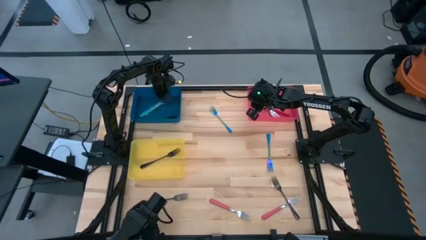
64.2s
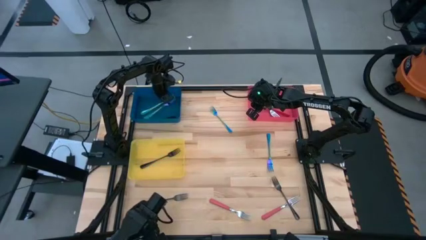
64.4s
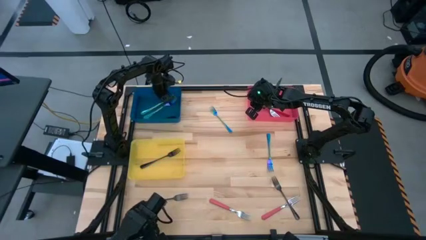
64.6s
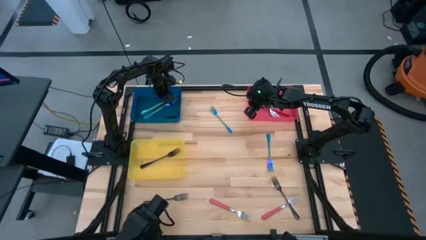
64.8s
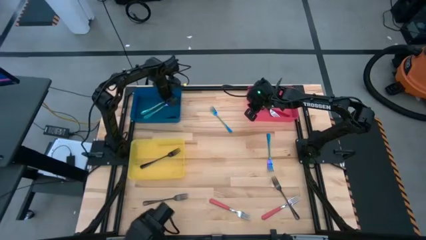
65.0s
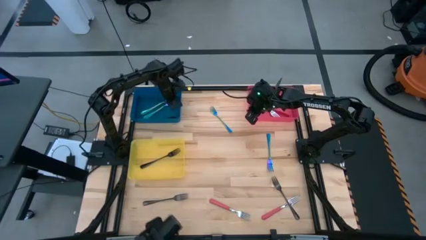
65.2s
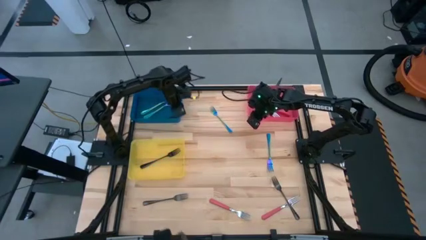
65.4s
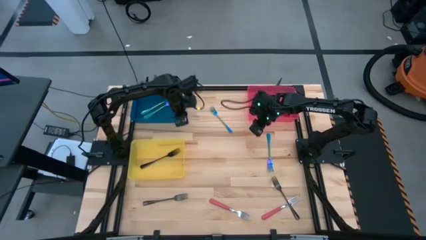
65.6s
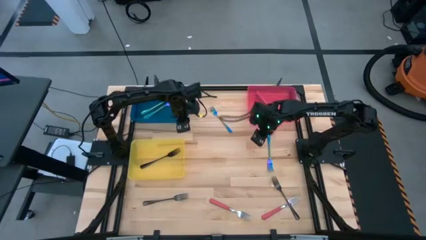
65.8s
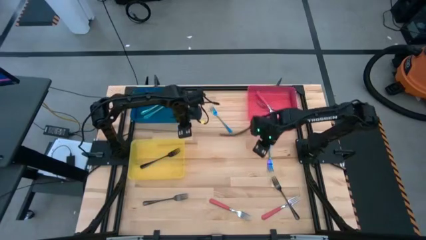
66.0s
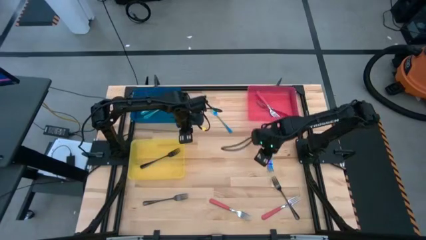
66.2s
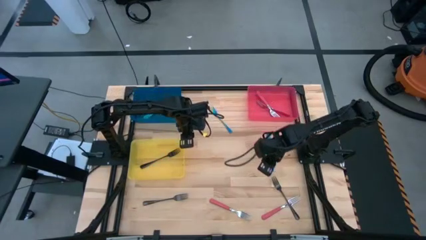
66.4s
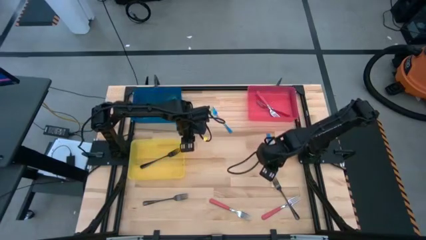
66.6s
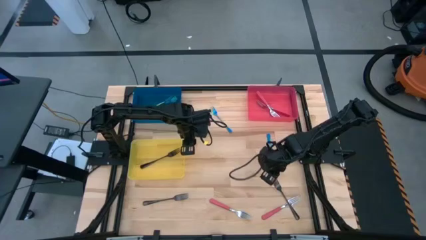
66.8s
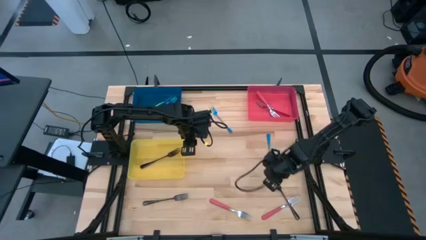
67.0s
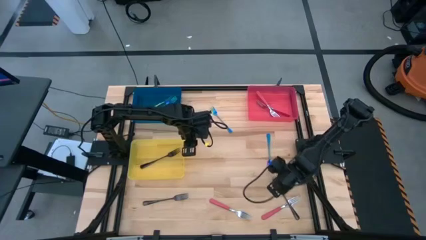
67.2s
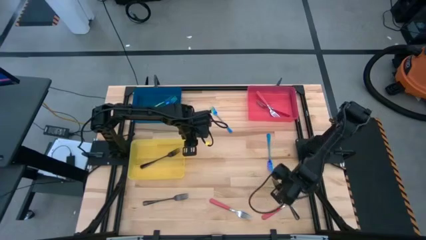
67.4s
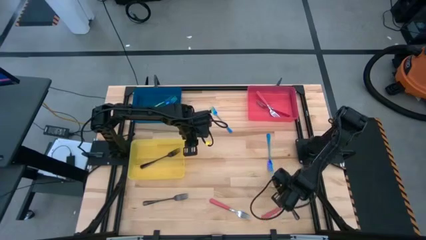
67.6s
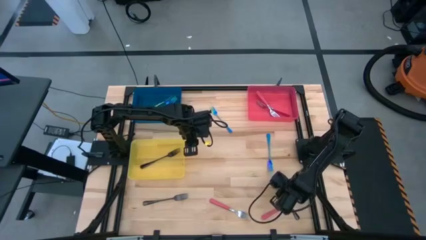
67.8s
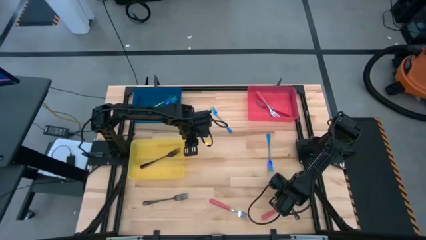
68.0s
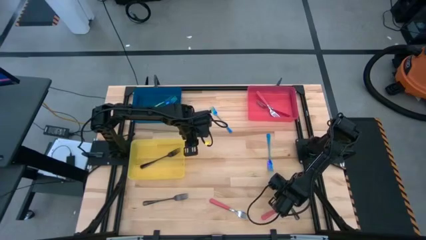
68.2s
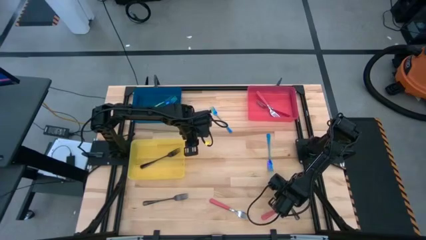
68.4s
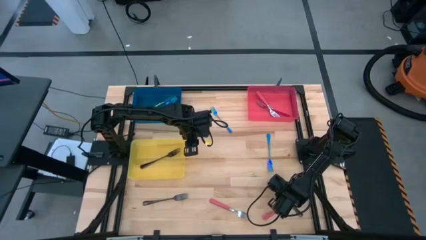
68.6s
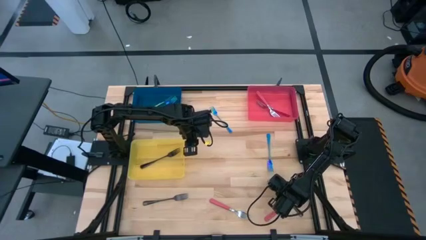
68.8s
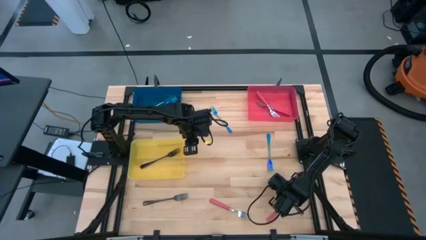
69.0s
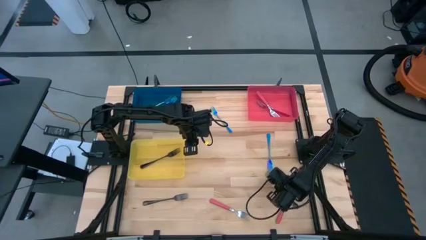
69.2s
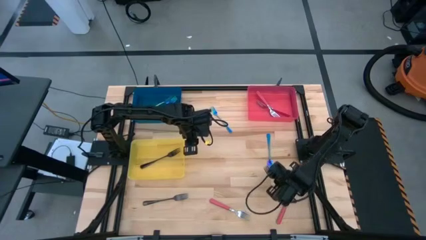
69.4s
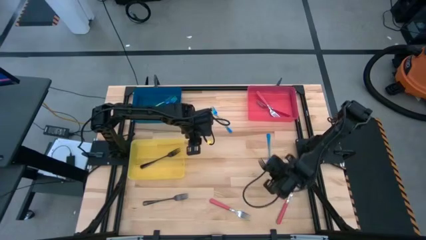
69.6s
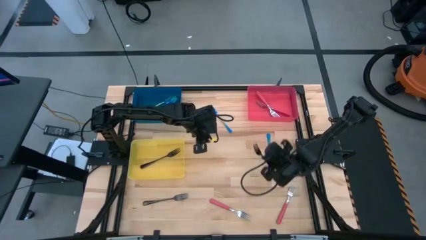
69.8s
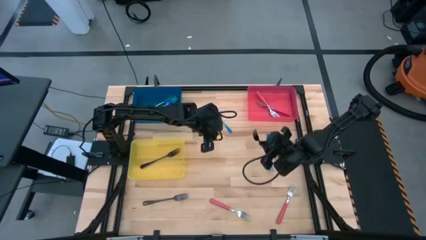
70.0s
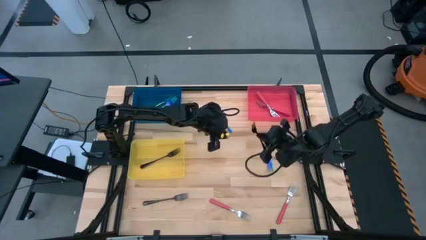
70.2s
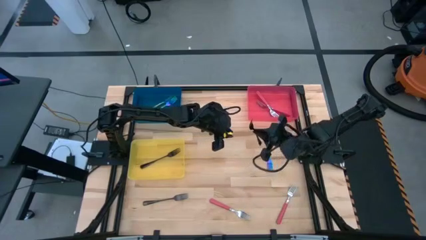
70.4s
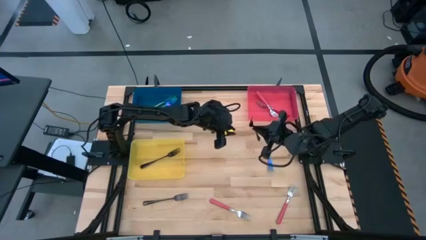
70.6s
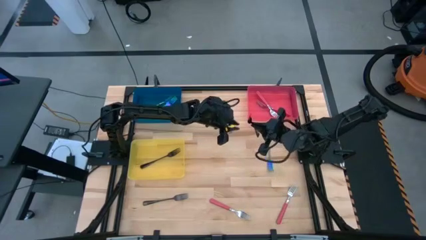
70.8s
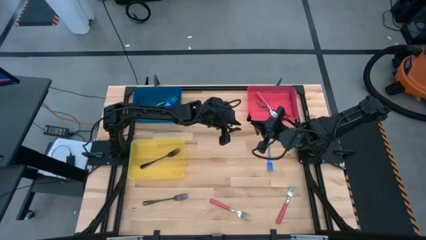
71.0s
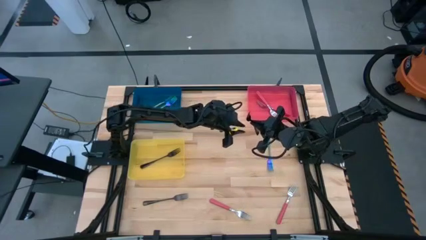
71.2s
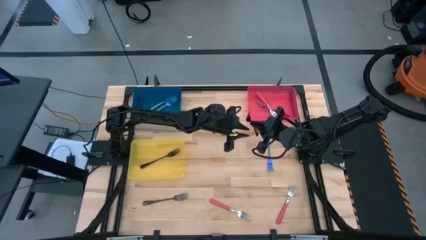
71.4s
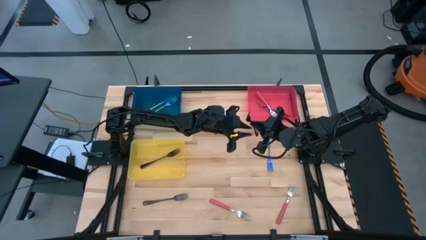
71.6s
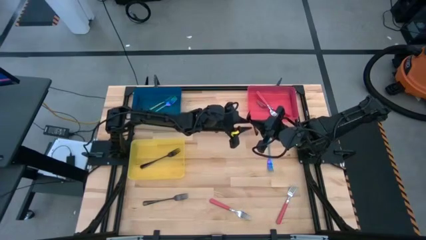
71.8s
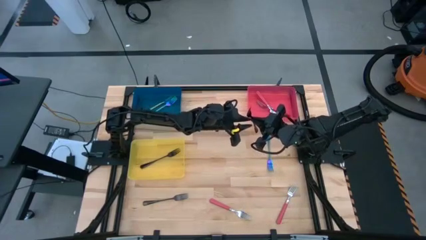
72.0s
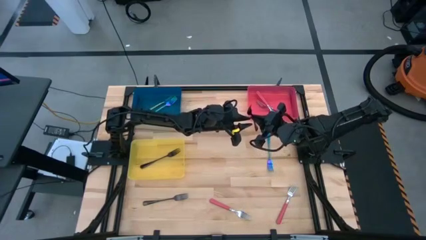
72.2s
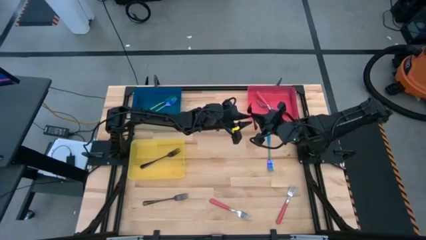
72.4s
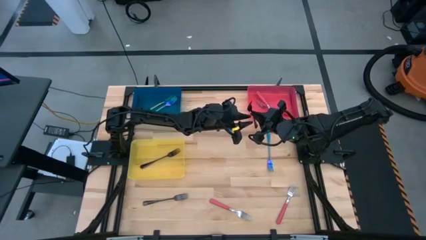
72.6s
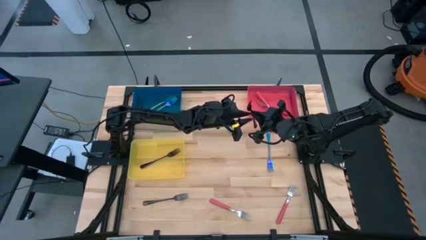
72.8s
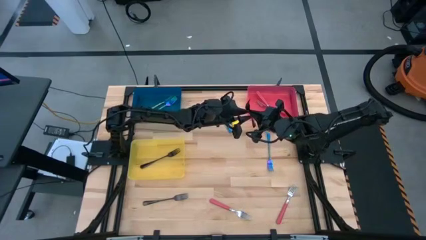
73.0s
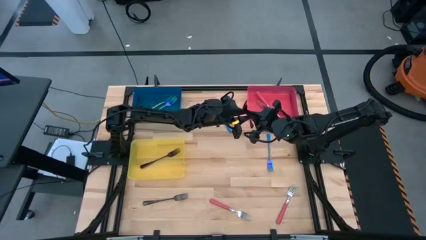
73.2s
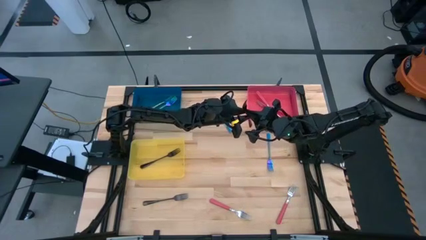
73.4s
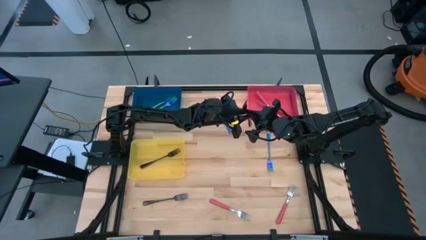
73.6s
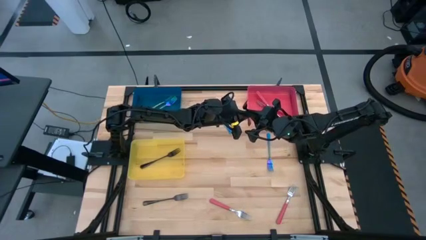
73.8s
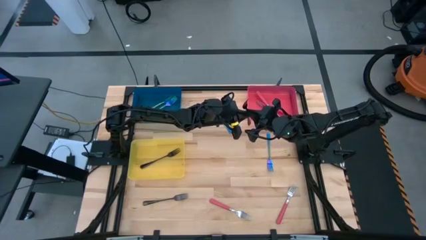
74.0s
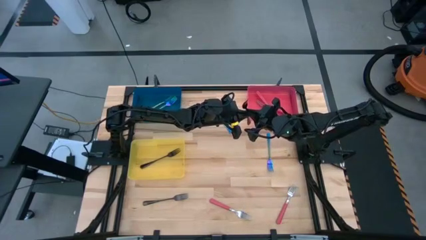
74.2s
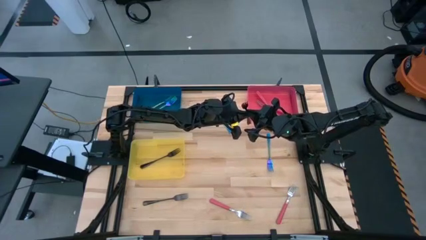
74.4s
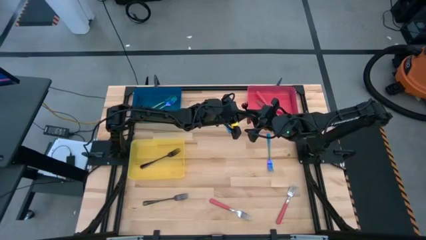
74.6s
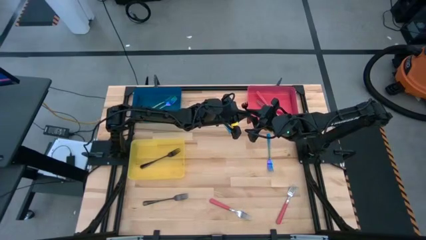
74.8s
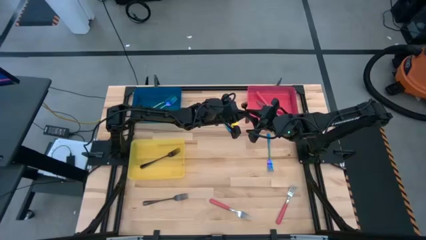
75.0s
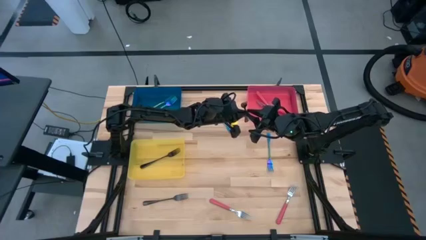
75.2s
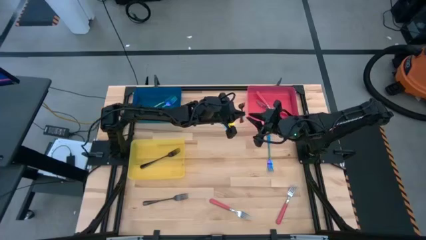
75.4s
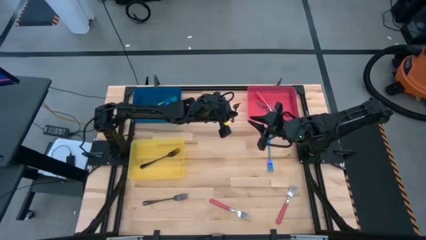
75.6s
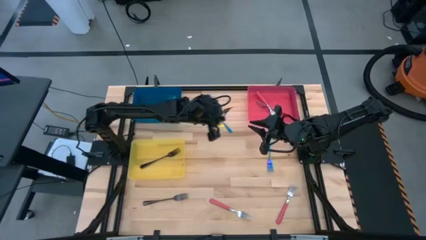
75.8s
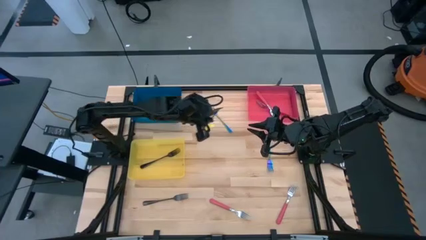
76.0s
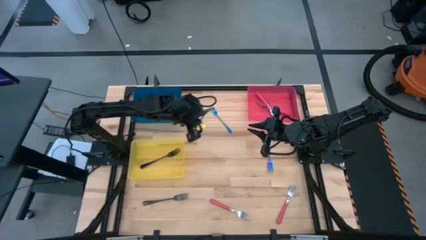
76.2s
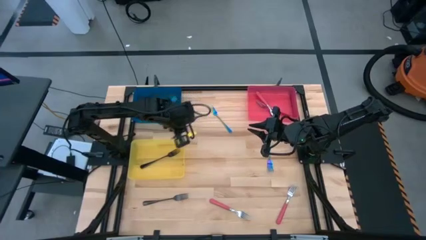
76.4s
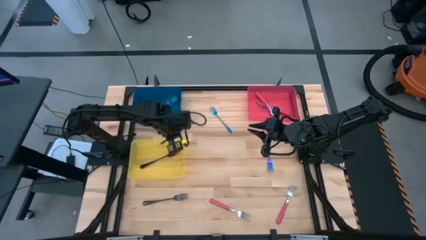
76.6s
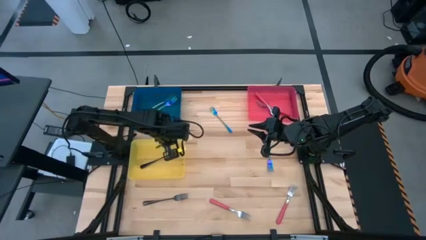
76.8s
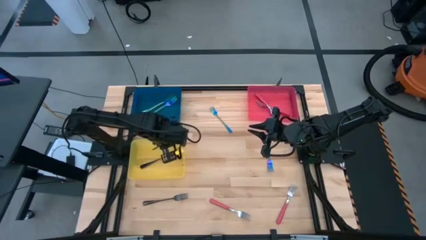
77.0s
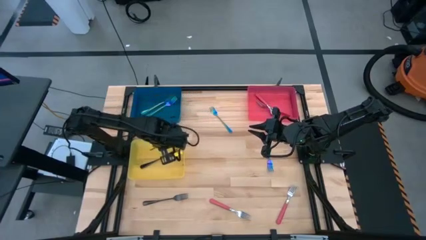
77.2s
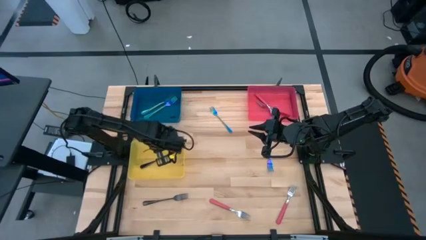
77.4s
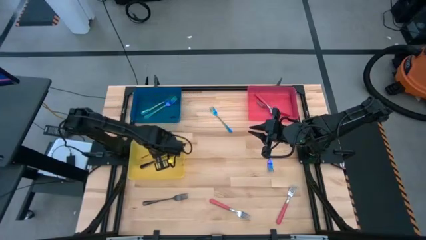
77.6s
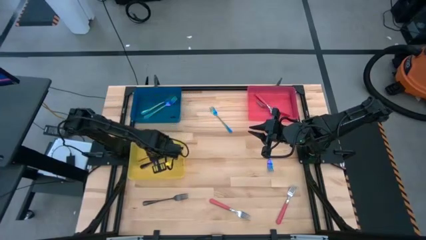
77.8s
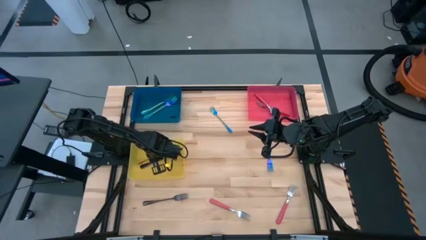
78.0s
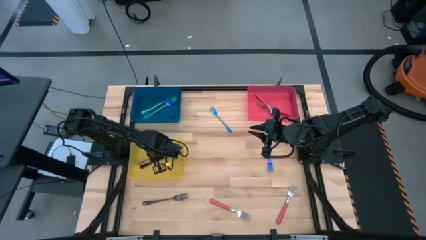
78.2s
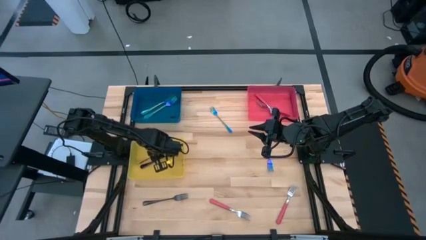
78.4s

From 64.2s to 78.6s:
Task: Sort silverware by color (type)
Put the black fork into the yellow bin
